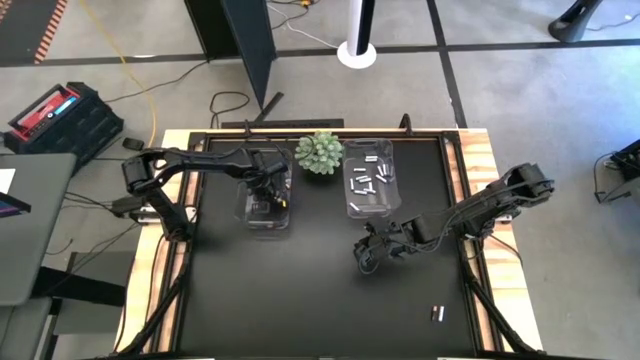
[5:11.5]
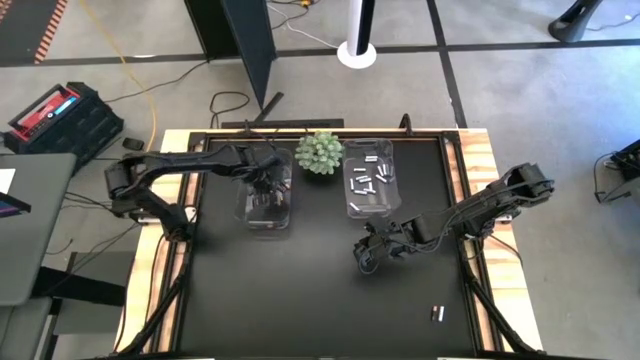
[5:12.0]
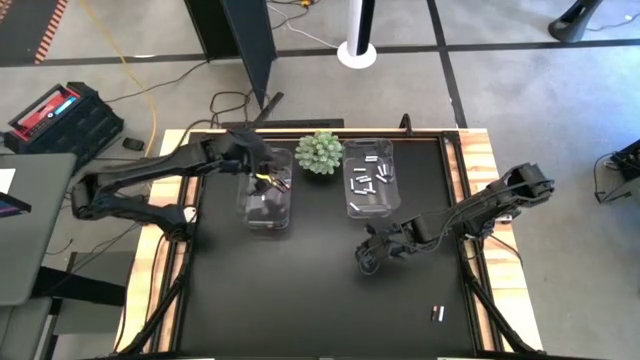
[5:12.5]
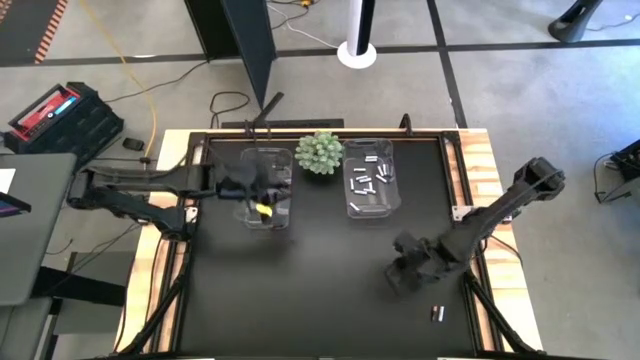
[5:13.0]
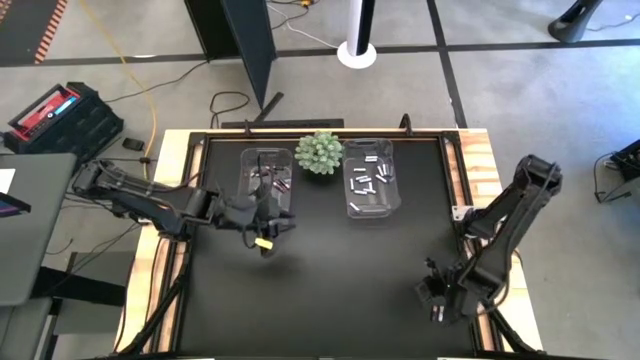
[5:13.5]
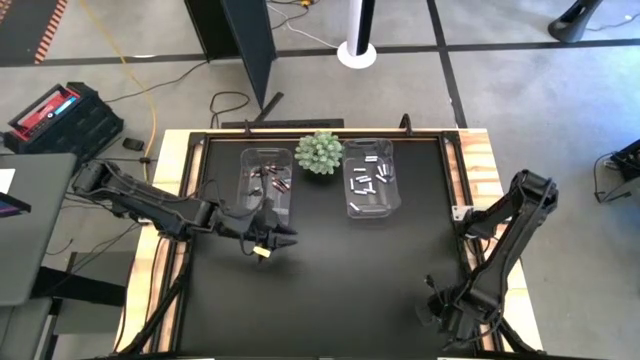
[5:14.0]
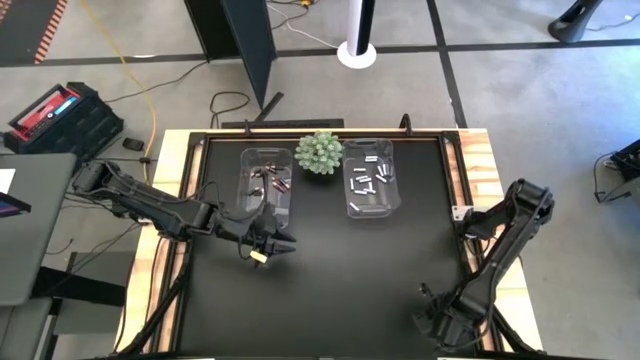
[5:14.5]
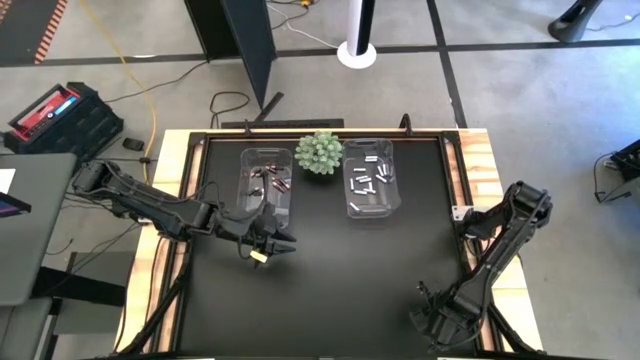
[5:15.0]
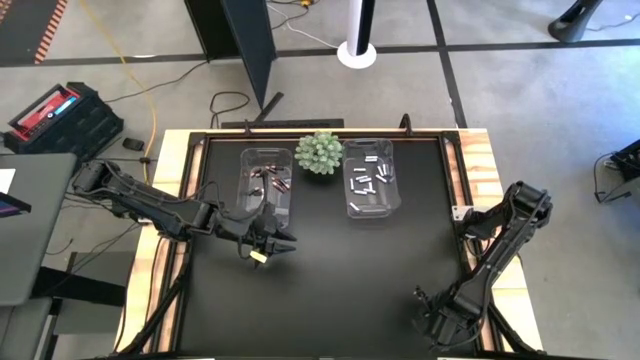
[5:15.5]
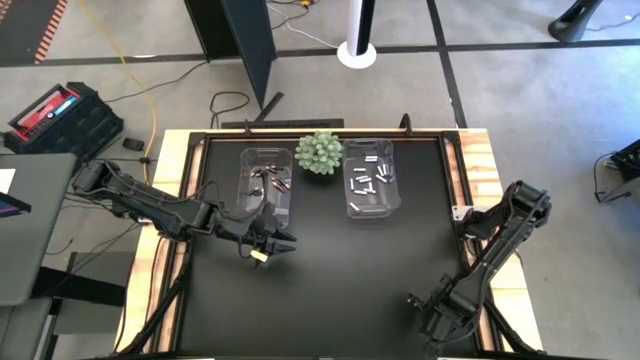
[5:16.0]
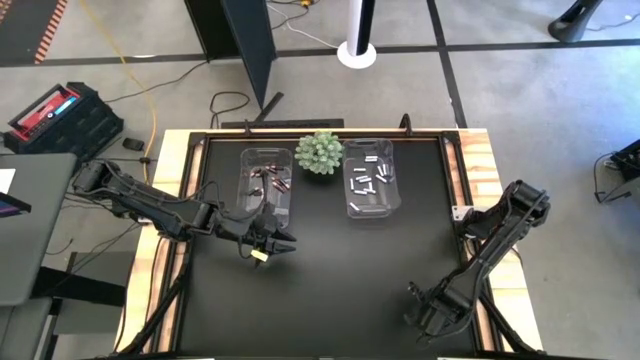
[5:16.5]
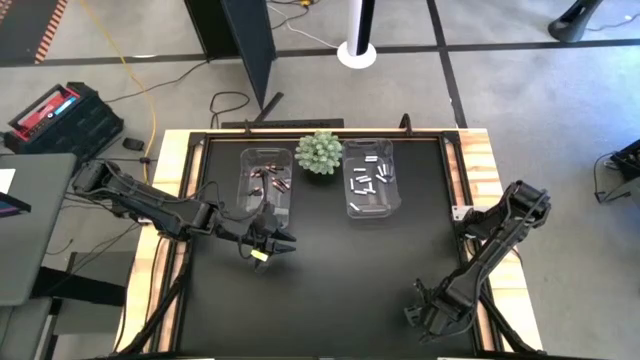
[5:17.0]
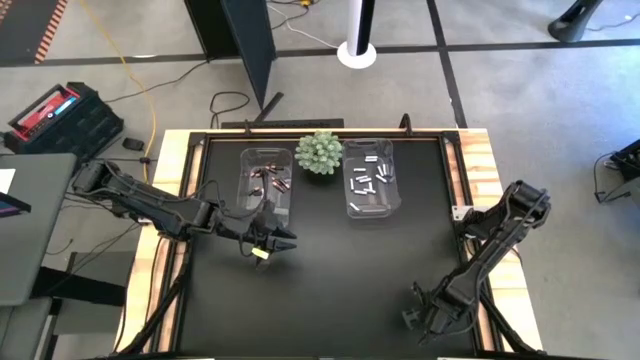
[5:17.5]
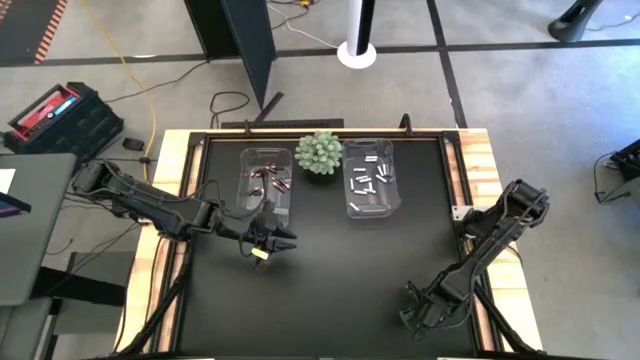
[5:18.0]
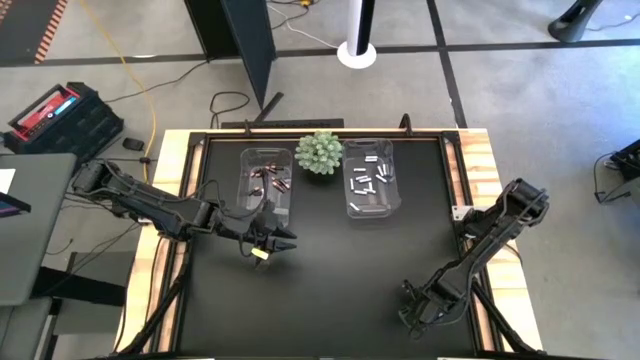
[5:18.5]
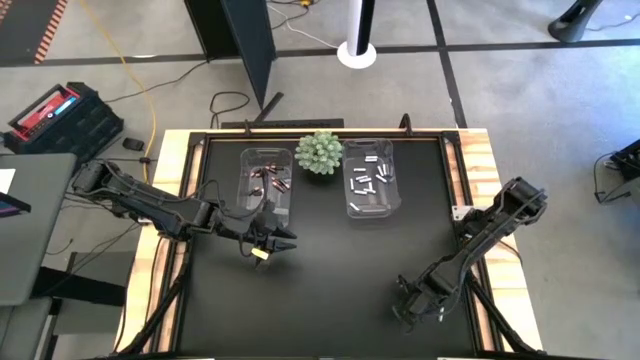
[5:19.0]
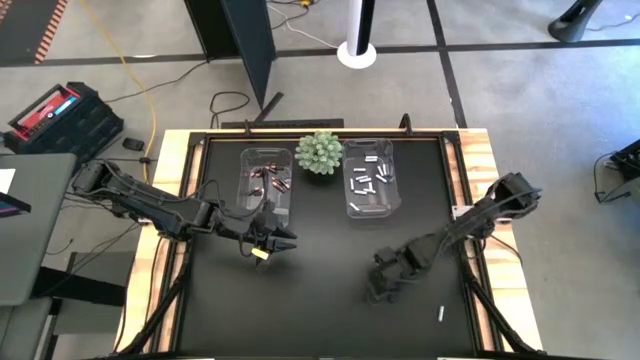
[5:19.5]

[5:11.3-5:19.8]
Task: Sort batteries
Put the black-brown battery into the left transparent bin

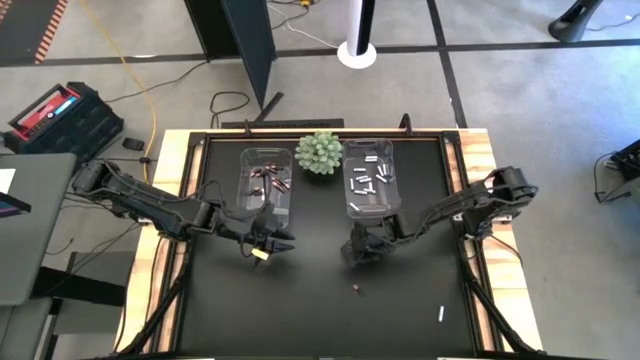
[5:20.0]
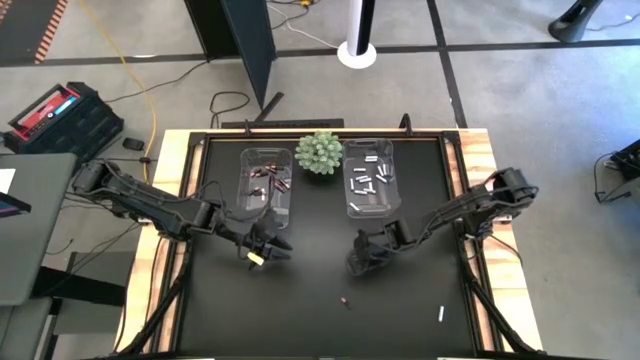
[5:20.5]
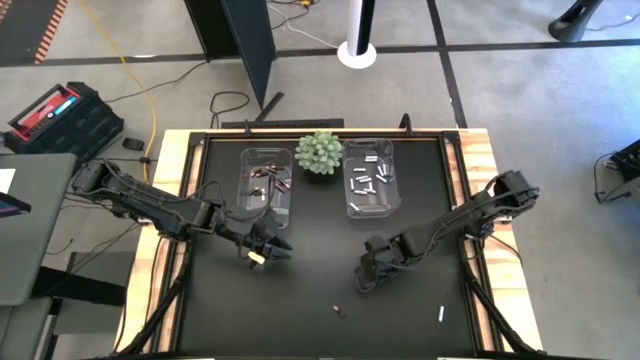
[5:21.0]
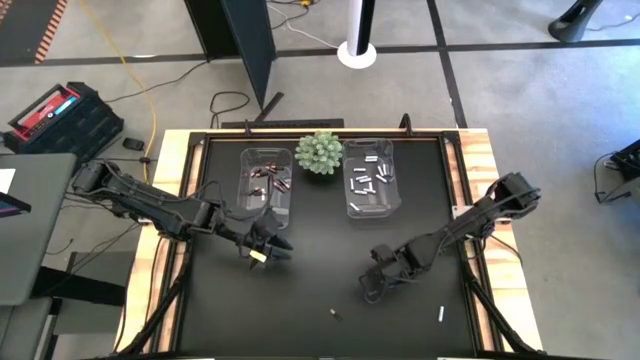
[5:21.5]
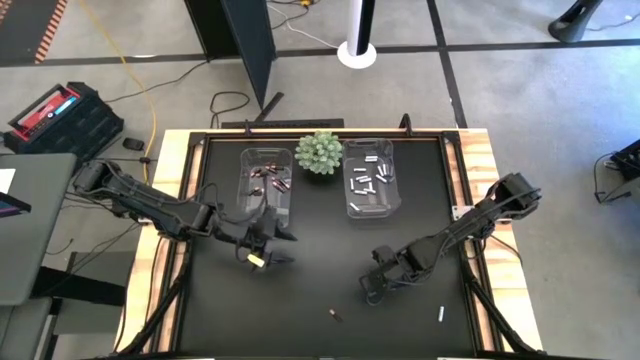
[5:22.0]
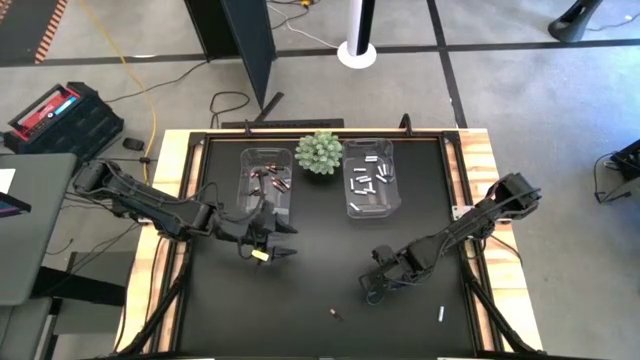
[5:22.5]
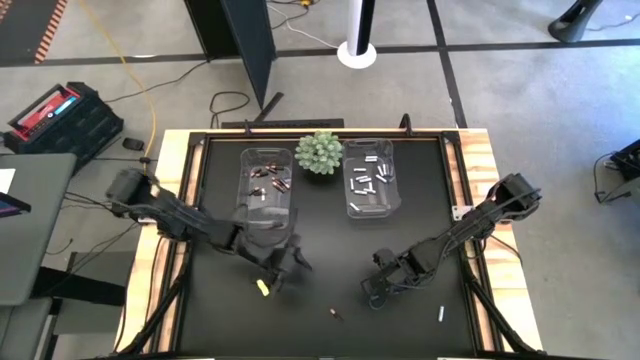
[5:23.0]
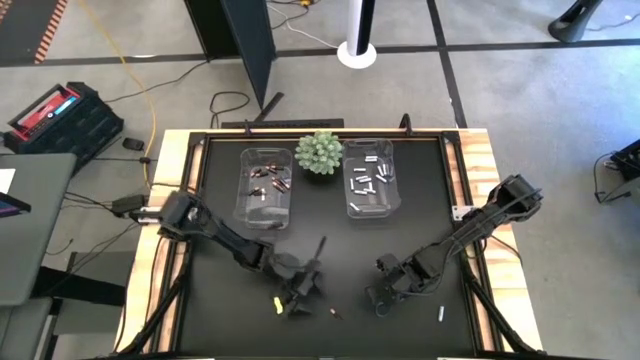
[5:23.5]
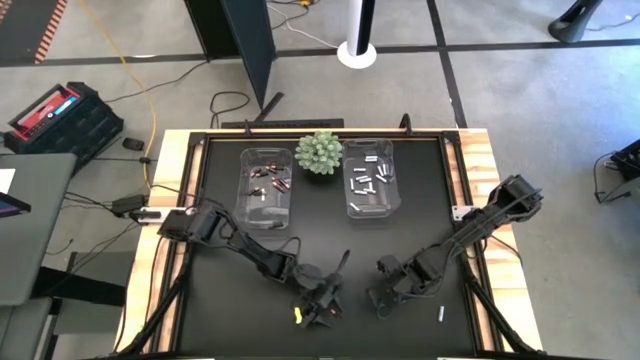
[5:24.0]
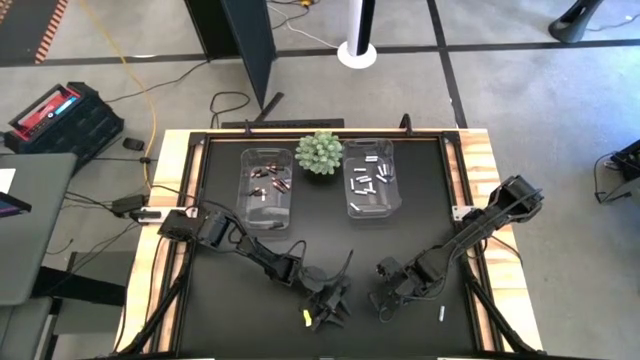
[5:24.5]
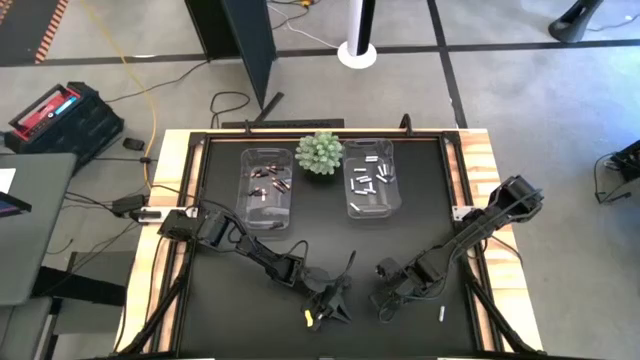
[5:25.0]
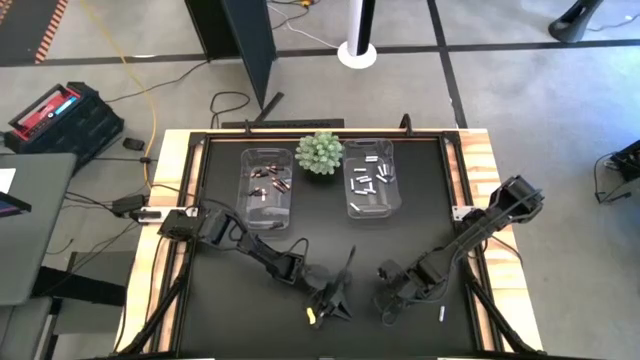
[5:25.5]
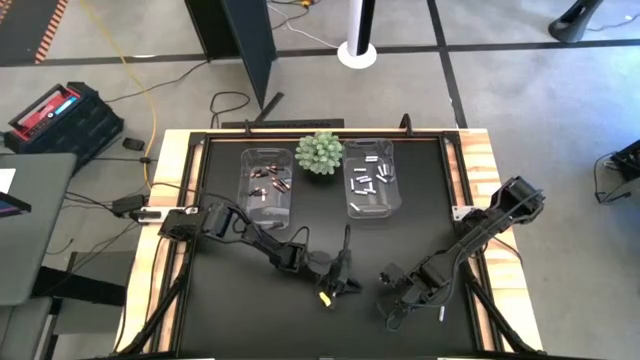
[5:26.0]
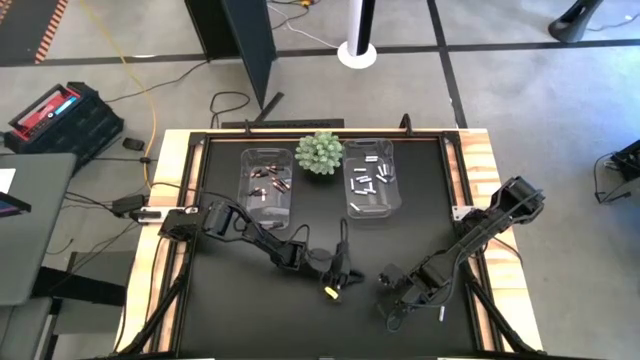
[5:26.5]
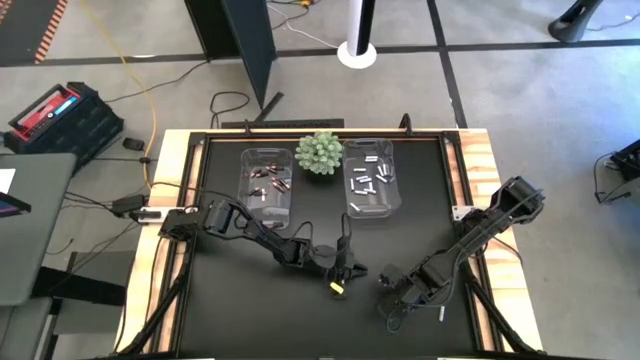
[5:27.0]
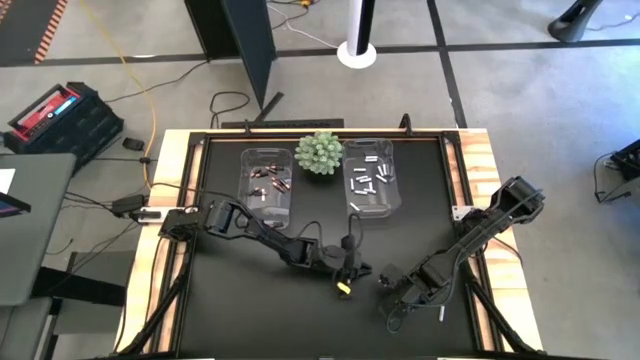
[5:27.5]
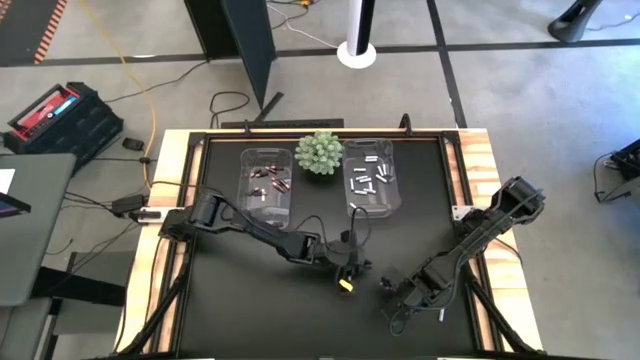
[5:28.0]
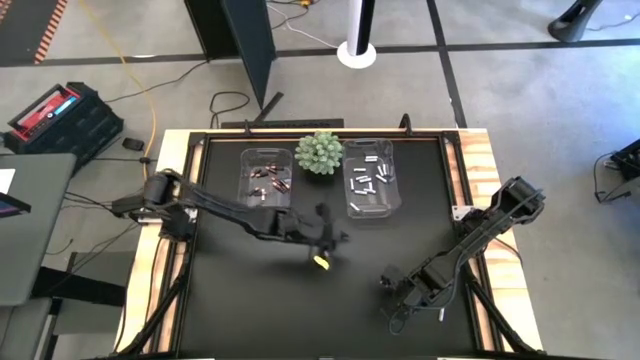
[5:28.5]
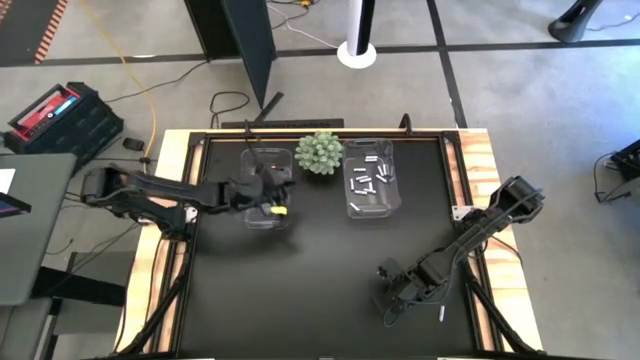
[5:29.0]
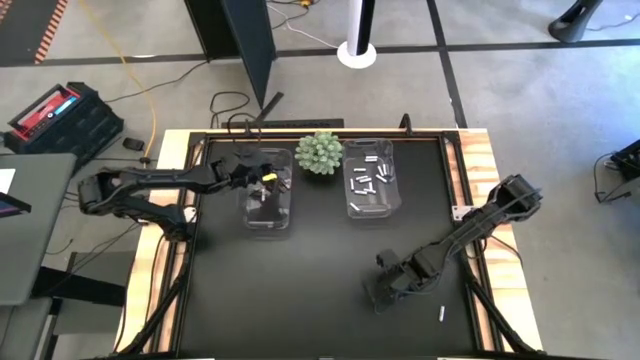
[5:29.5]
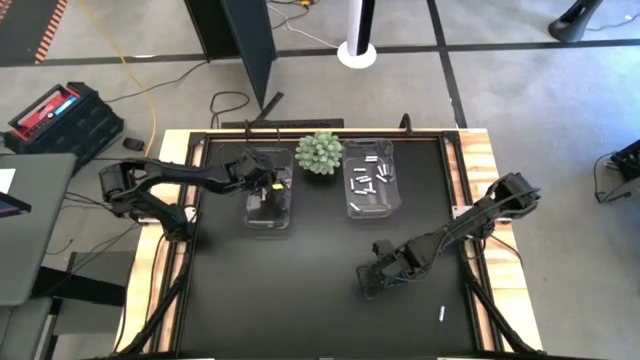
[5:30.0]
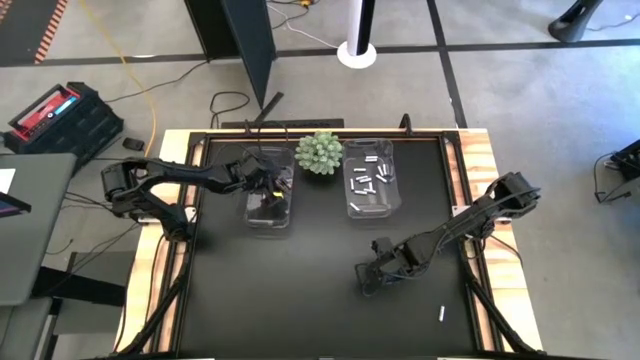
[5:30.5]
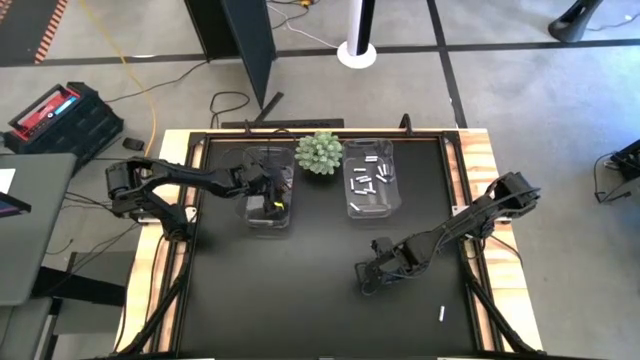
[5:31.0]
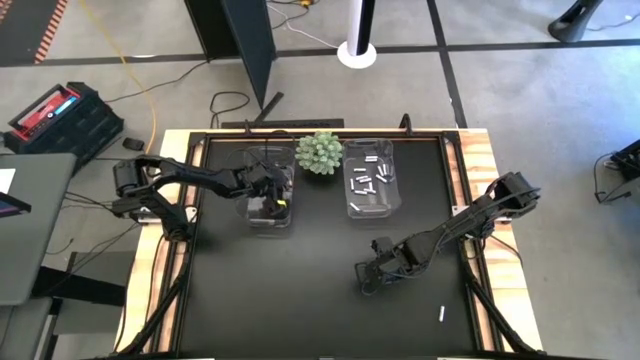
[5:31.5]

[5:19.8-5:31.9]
Put the black-brown battery into the left transparent bin
